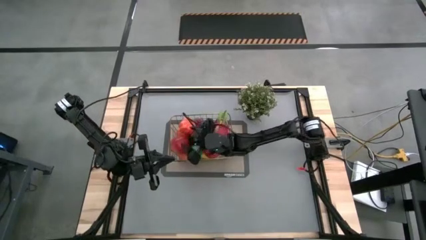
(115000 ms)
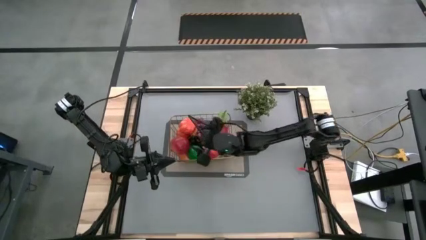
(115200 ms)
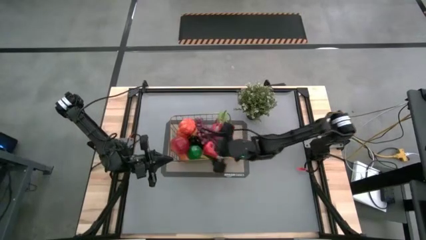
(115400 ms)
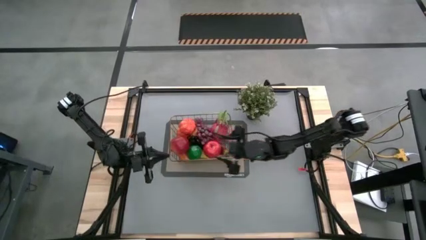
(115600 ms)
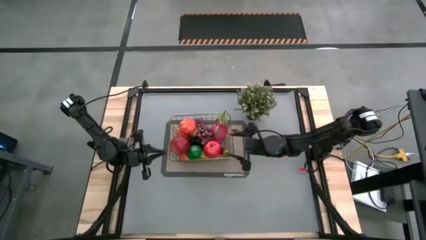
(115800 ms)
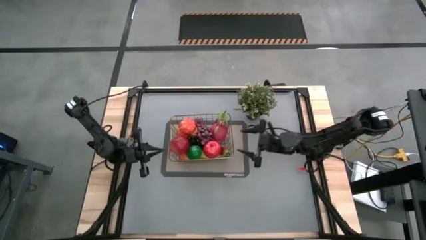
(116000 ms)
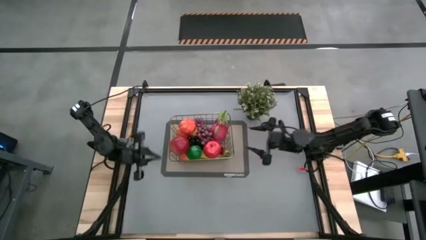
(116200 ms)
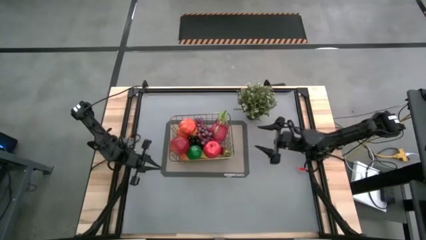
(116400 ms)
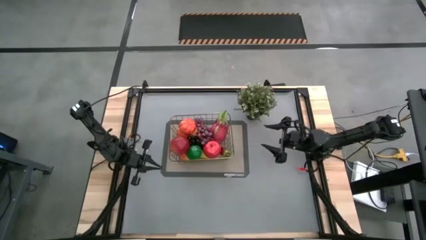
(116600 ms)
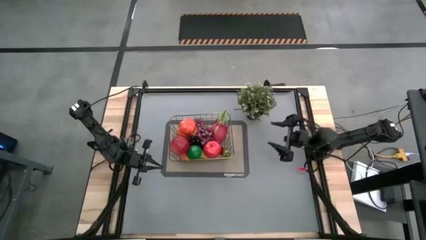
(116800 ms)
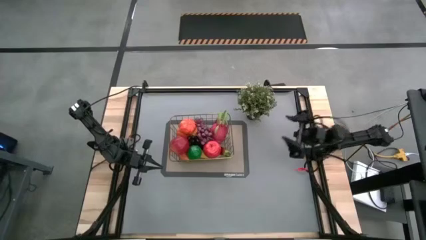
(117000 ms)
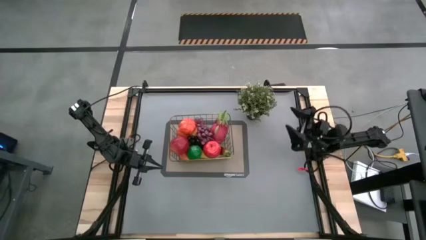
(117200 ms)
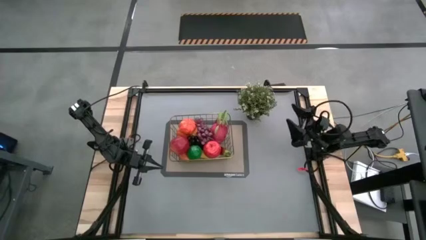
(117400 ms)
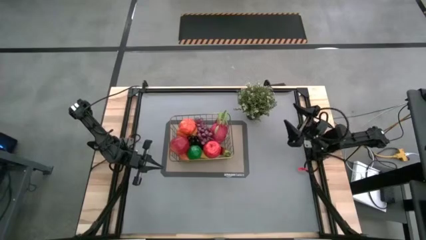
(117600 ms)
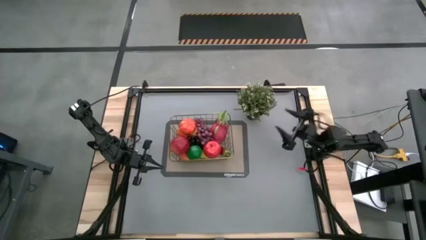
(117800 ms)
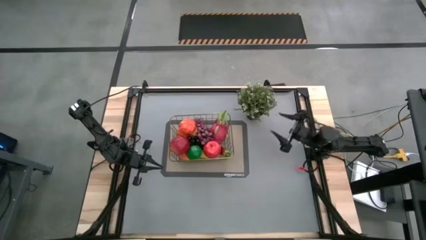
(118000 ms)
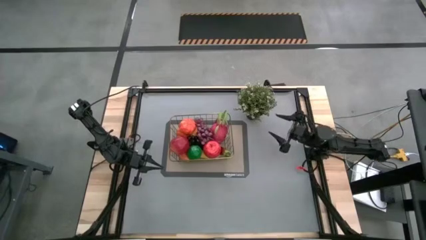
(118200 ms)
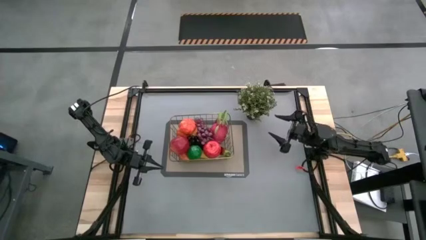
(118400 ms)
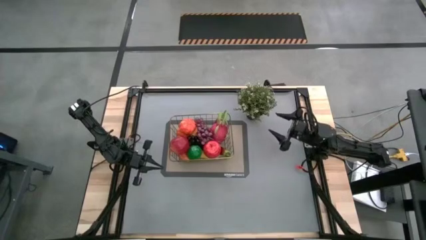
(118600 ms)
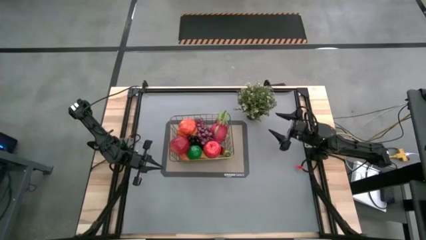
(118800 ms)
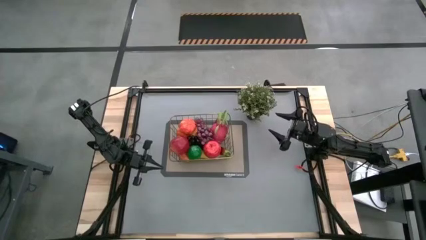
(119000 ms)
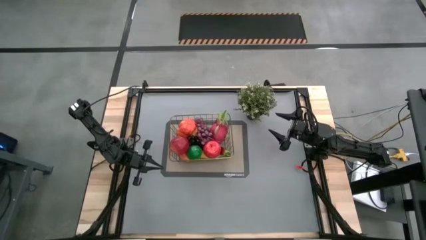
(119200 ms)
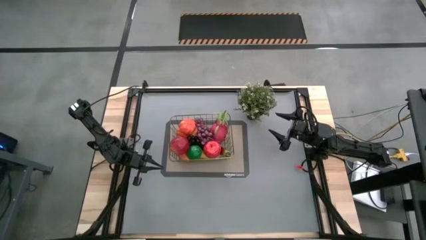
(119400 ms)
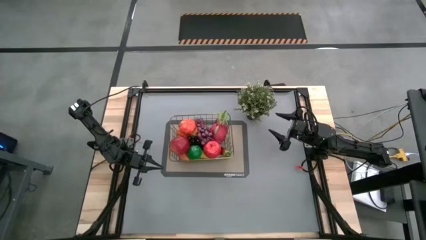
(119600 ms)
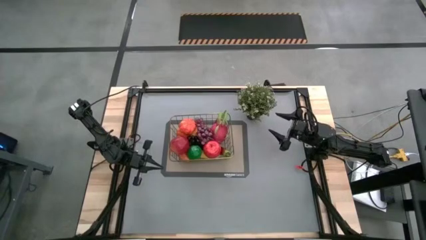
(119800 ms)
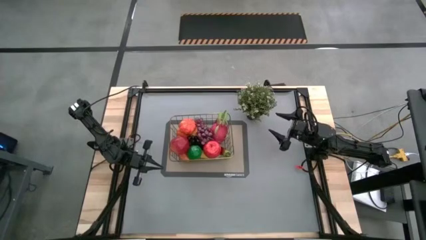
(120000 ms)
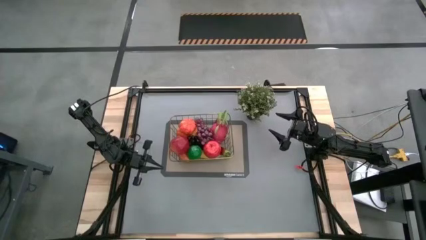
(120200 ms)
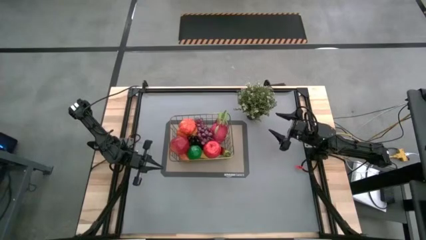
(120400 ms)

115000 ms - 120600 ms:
Task: Build produce basket
Return to Home Position

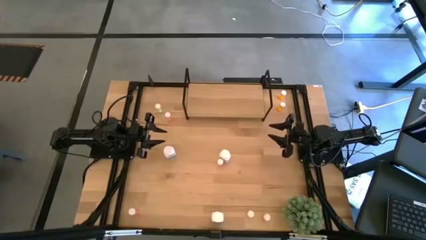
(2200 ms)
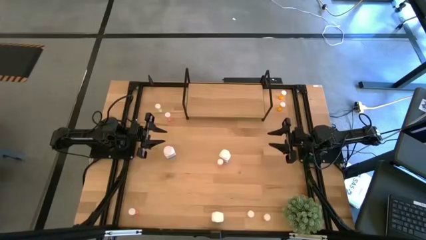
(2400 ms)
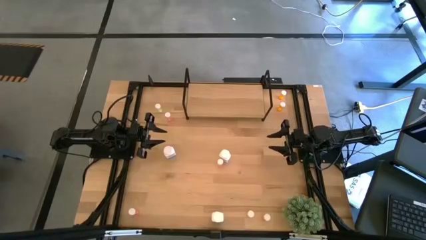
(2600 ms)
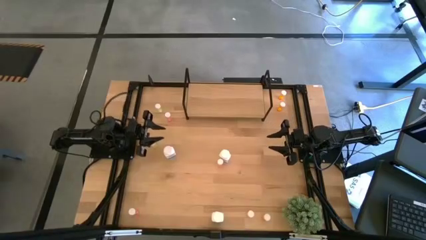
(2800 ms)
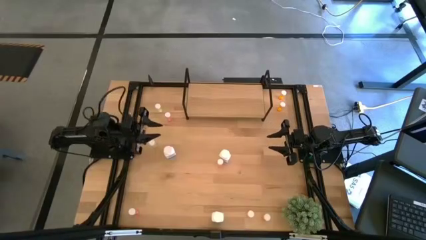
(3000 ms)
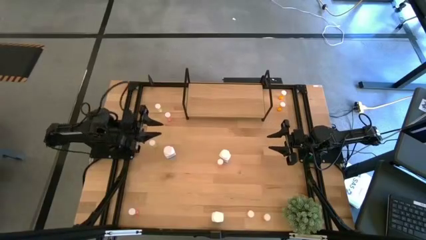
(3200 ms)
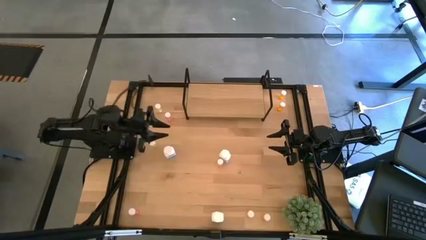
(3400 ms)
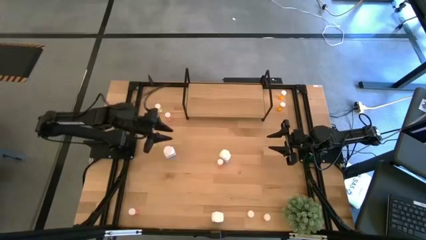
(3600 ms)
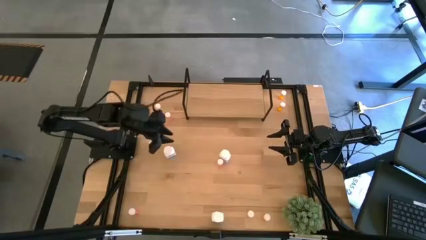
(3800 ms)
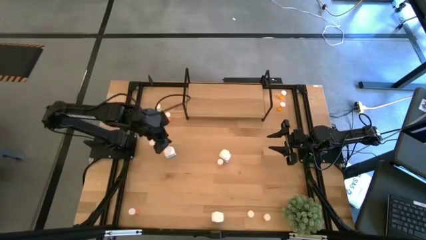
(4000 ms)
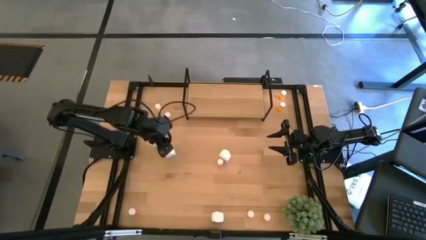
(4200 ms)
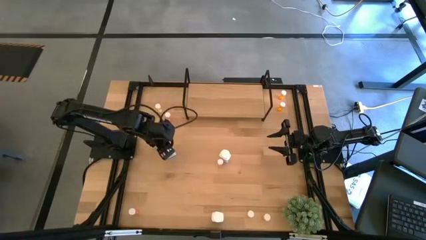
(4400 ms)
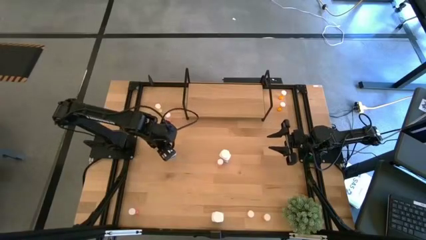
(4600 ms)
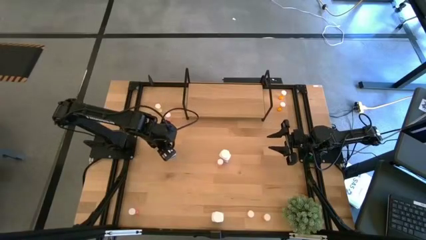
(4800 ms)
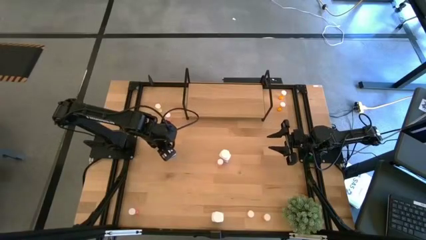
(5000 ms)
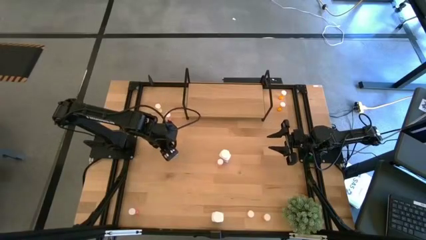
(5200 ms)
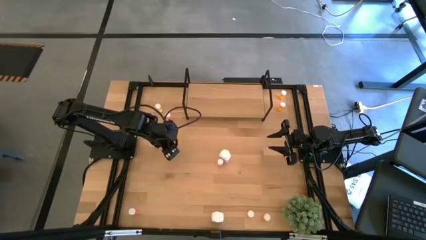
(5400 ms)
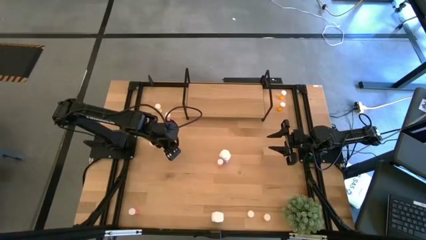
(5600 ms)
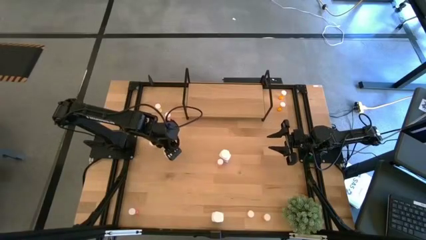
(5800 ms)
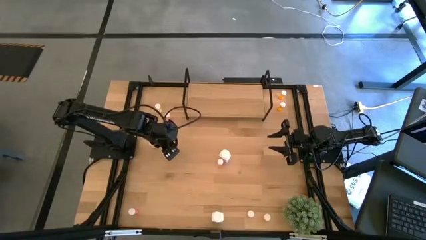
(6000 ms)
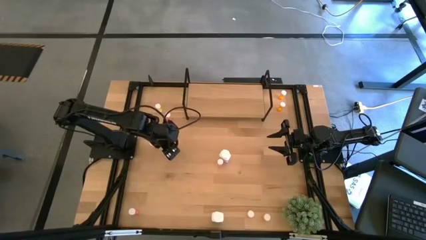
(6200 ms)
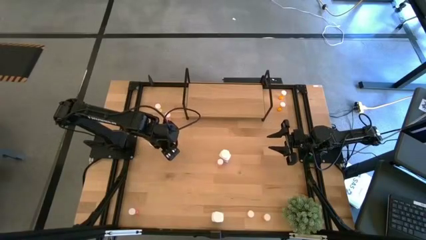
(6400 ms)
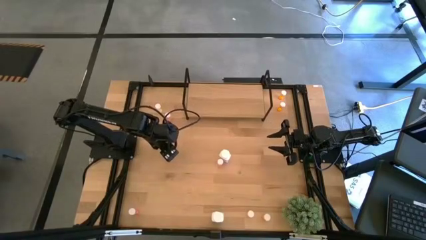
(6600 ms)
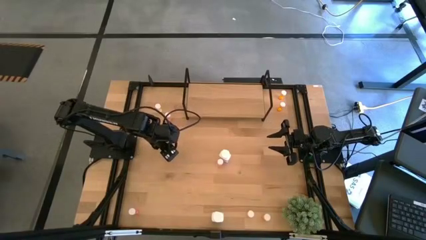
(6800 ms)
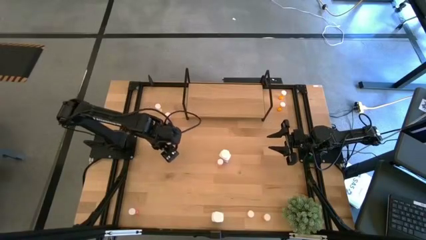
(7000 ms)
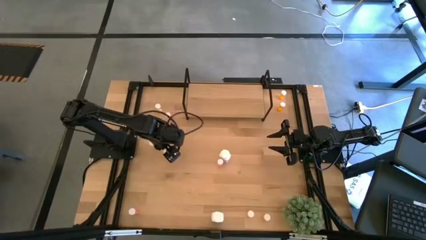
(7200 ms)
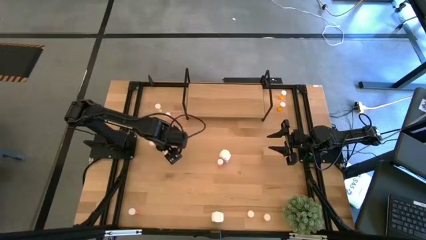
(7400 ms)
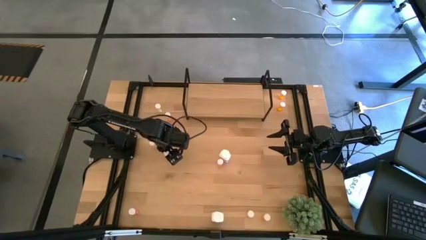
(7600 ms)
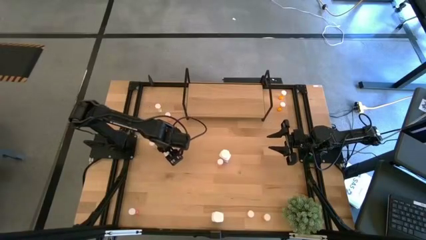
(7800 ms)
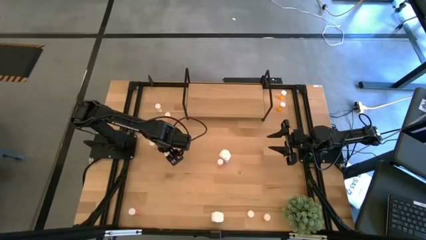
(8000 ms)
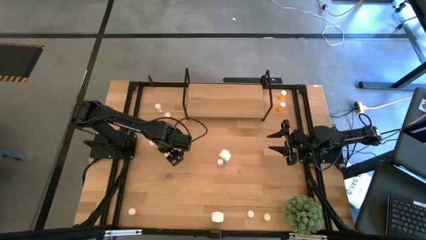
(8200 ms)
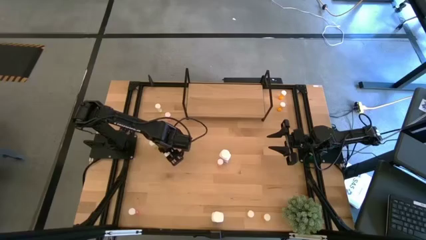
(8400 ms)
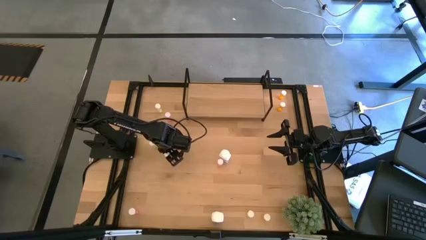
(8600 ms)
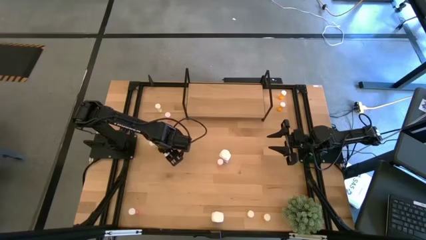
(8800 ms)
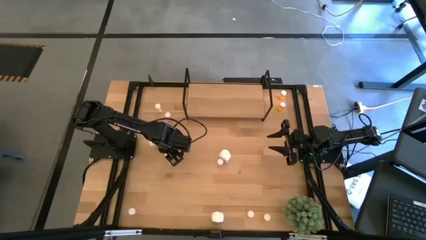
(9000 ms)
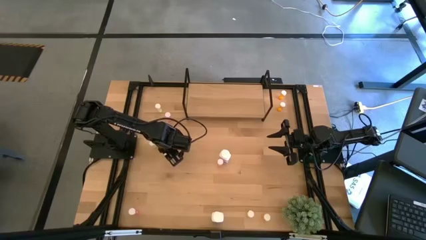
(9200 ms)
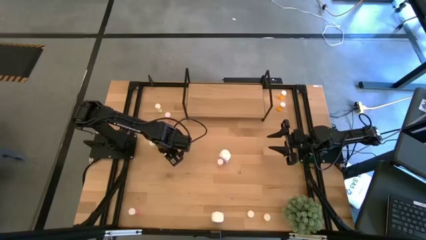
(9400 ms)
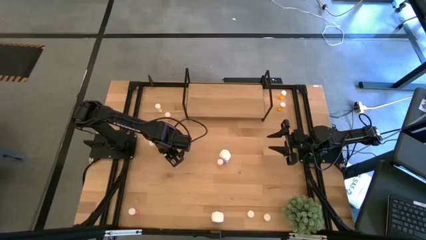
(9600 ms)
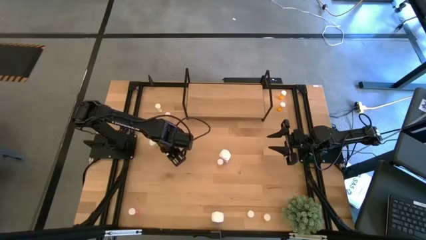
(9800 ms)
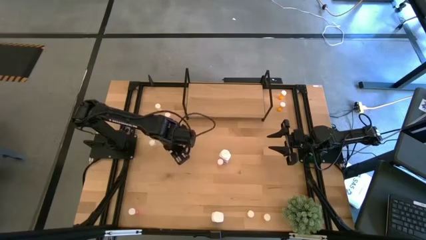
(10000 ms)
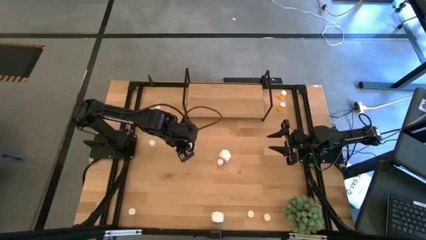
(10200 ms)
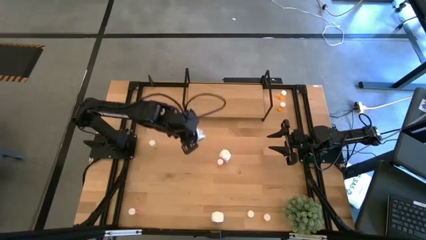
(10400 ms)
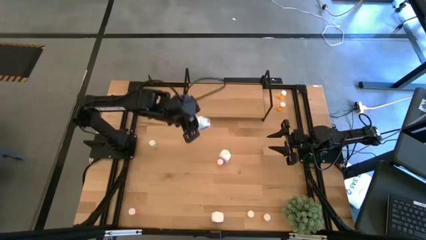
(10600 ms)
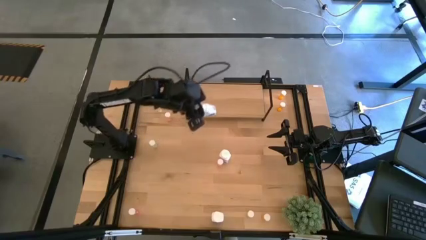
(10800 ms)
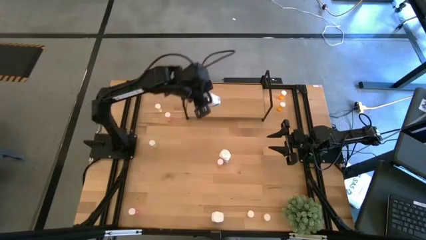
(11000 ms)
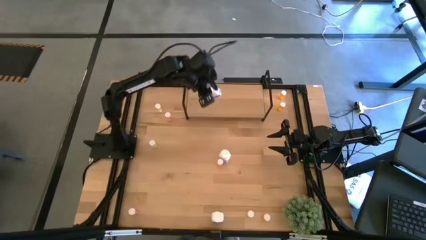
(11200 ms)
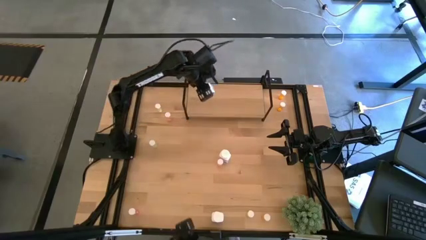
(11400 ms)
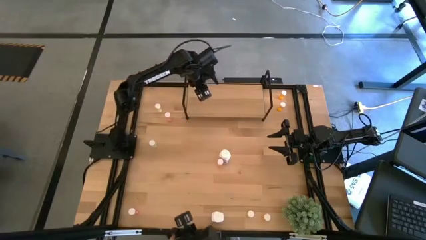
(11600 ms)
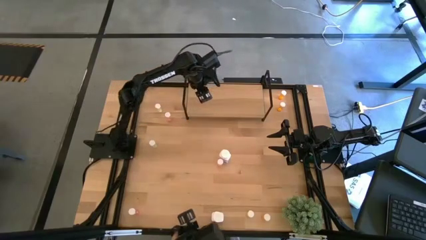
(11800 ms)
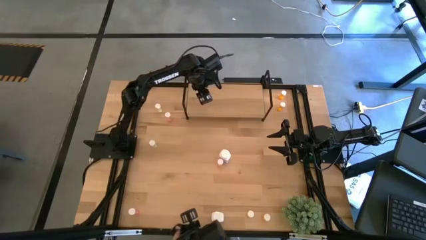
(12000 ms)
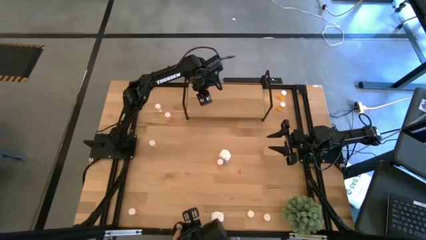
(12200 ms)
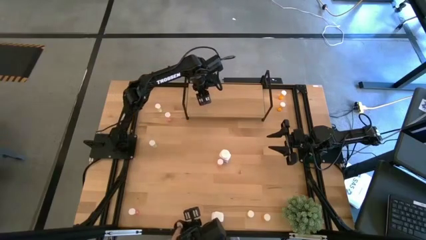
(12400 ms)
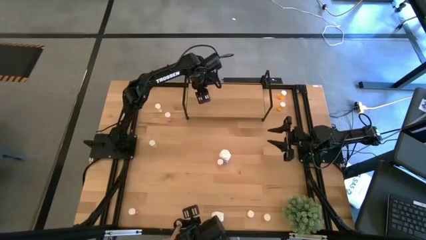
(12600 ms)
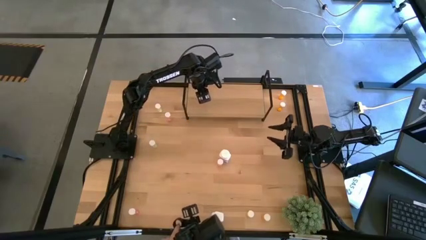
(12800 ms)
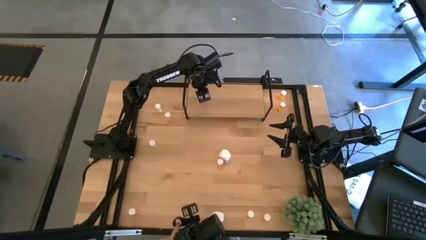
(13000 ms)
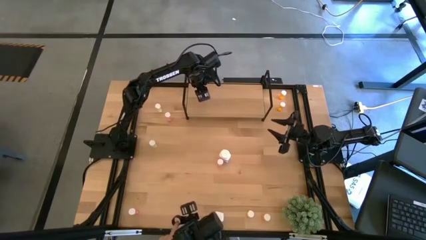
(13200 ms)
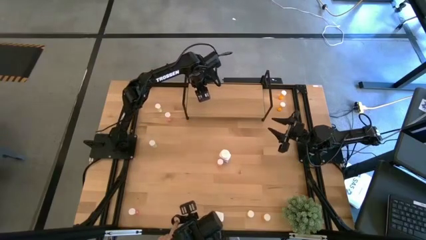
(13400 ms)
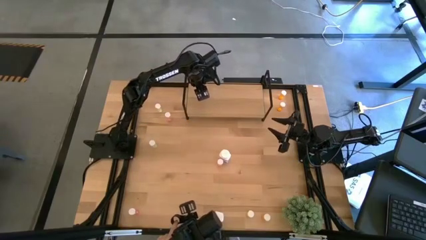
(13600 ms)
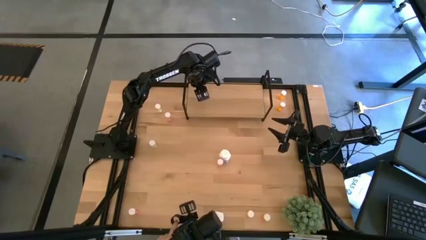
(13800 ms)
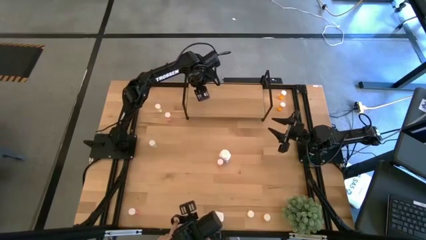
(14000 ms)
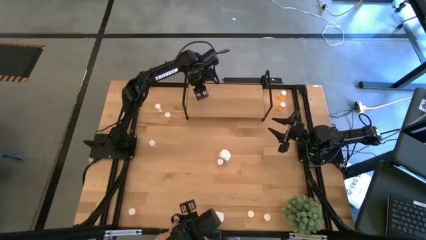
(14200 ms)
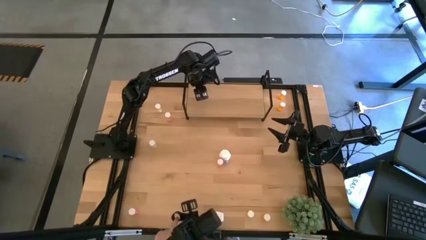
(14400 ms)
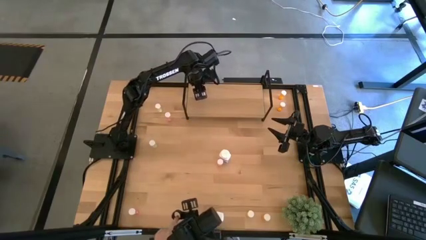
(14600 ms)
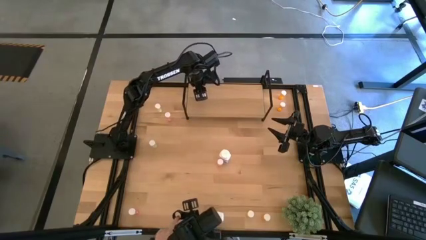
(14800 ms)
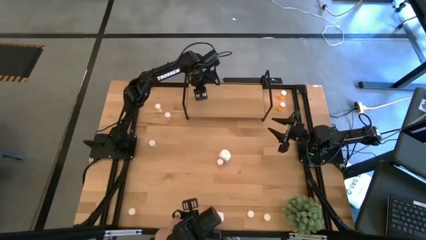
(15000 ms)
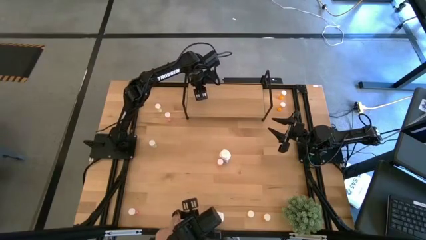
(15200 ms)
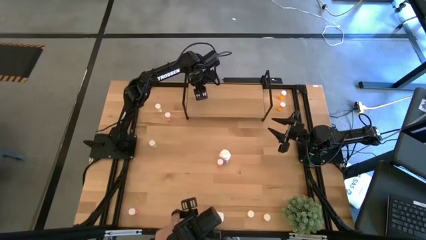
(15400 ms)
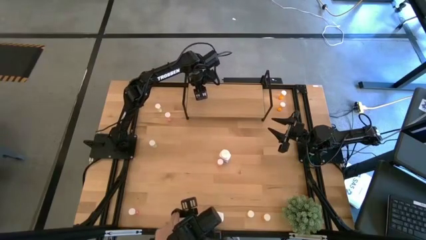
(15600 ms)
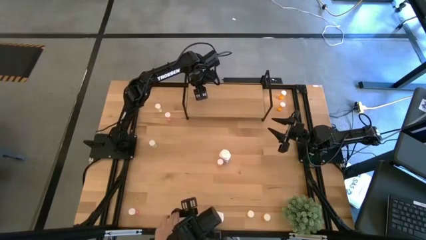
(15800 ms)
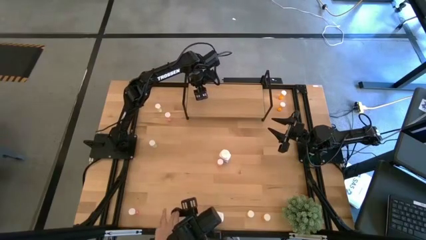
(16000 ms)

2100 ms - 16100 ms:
Task: Pick and place medicine bottles onto shelf by color
Put the top left white pill bottle on the shelf
